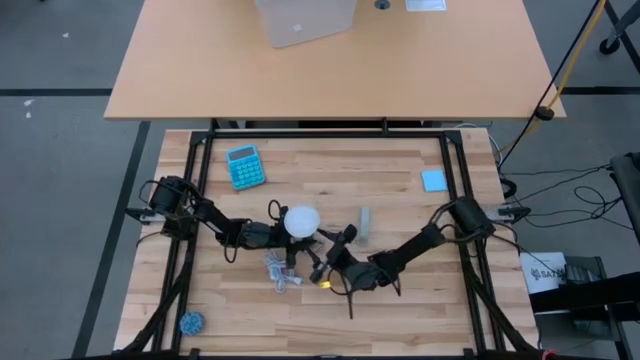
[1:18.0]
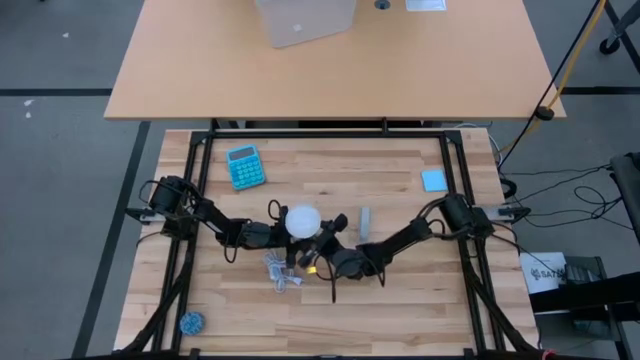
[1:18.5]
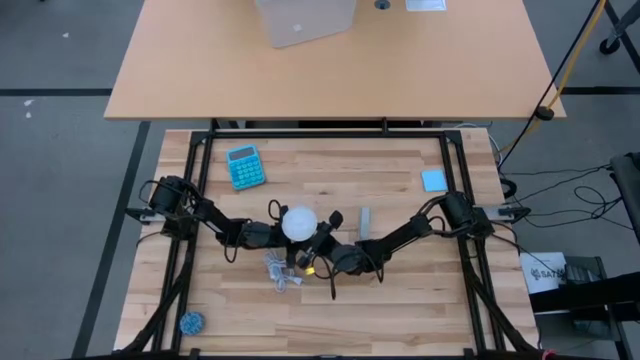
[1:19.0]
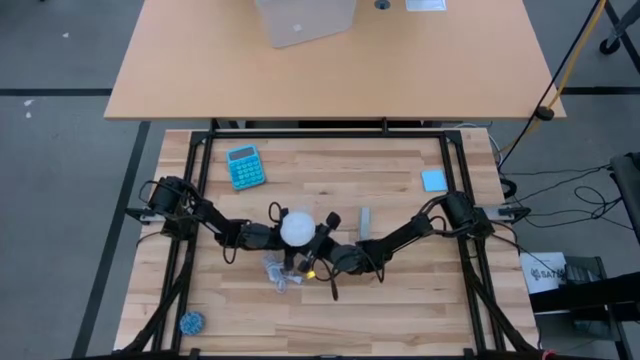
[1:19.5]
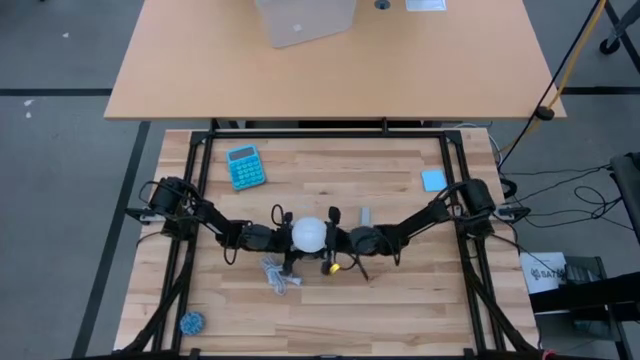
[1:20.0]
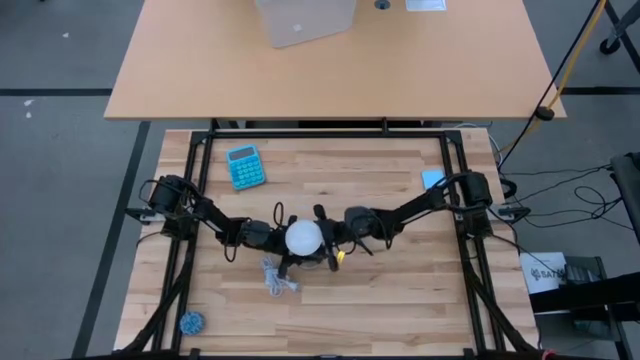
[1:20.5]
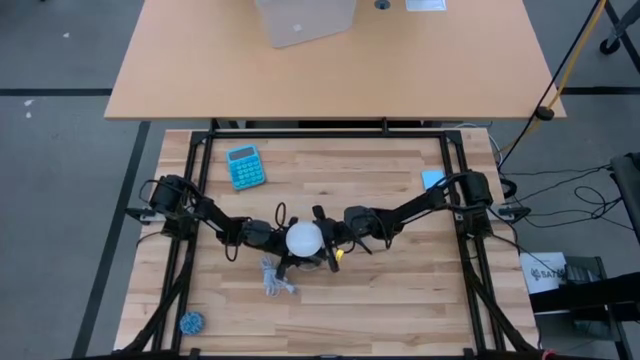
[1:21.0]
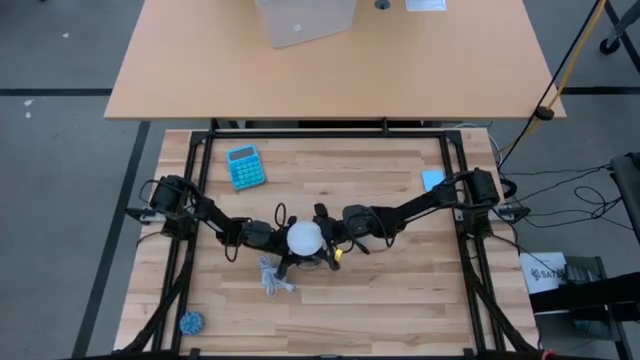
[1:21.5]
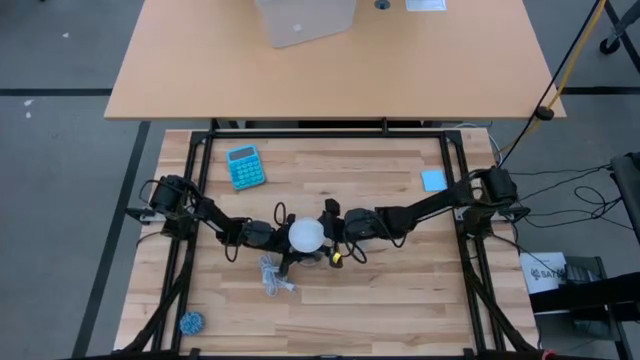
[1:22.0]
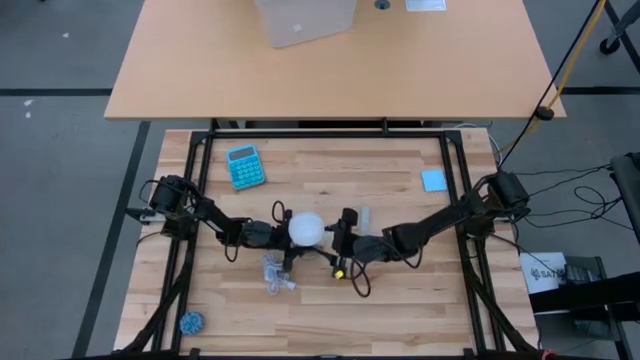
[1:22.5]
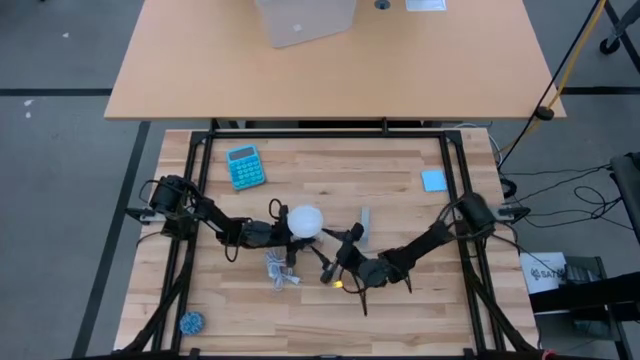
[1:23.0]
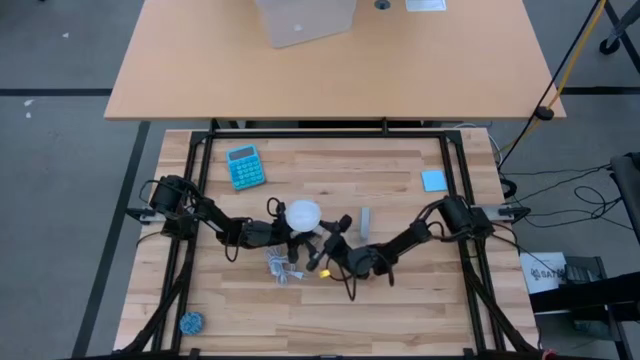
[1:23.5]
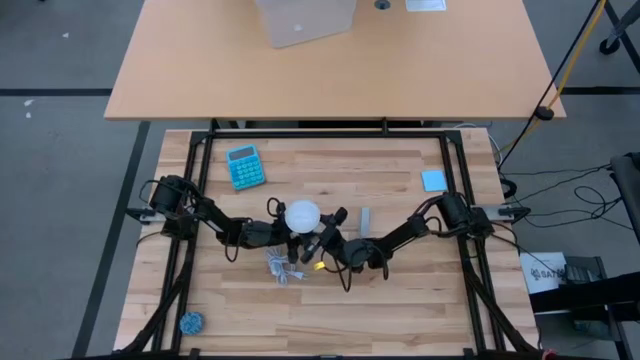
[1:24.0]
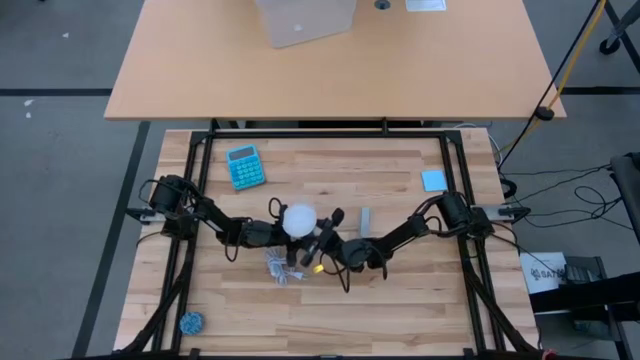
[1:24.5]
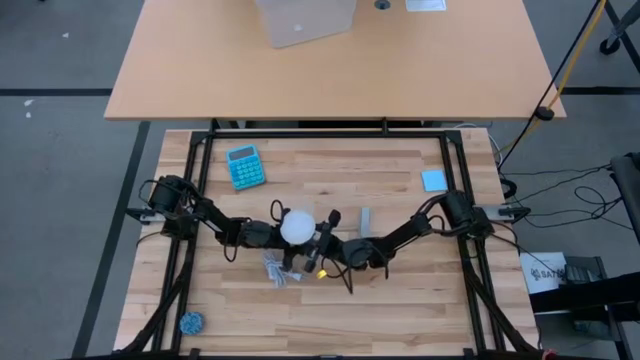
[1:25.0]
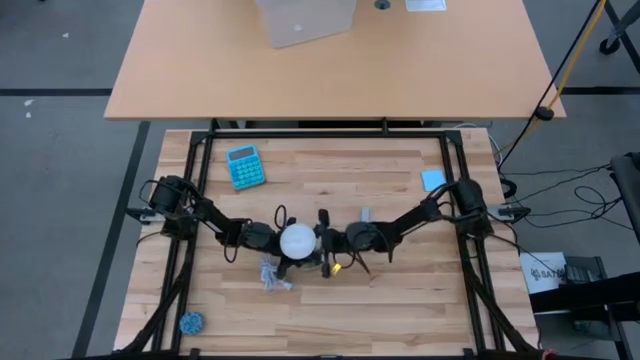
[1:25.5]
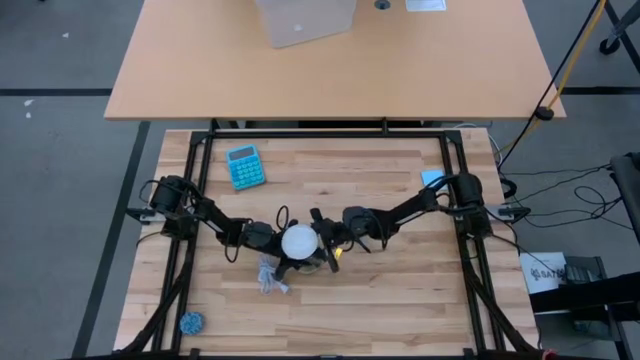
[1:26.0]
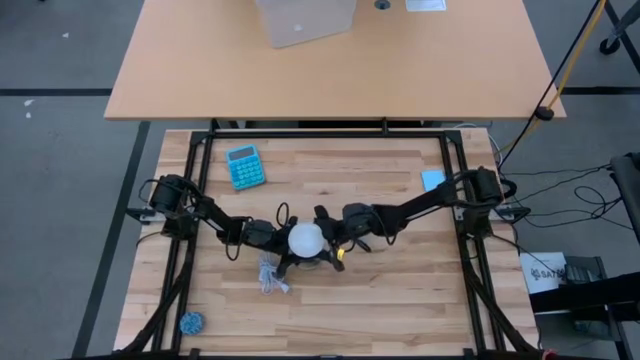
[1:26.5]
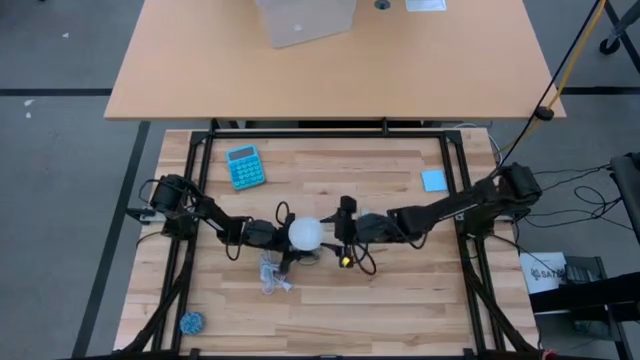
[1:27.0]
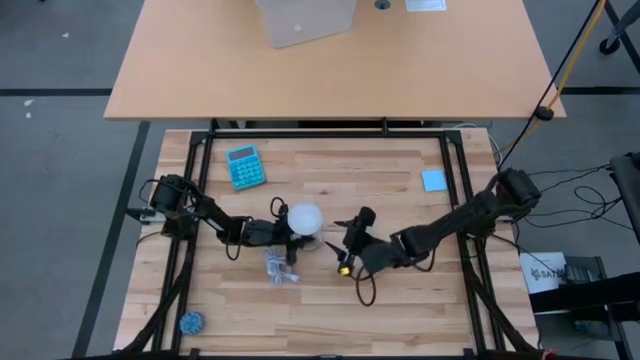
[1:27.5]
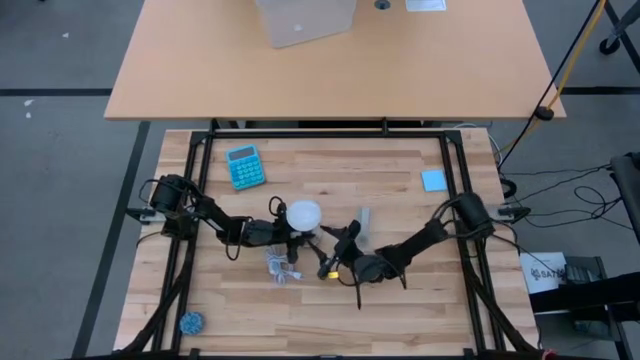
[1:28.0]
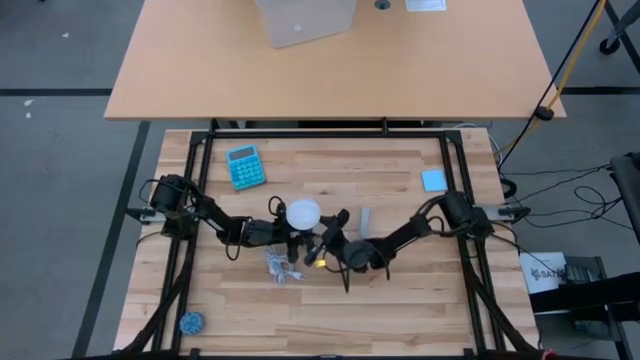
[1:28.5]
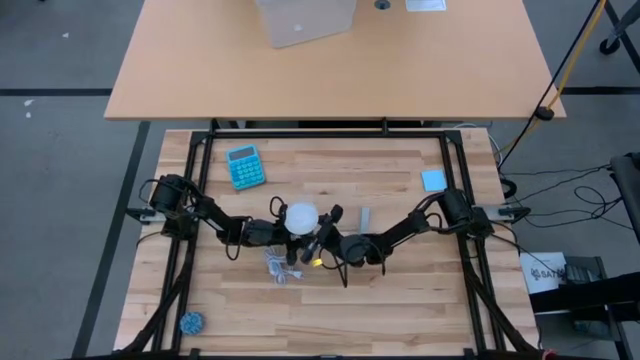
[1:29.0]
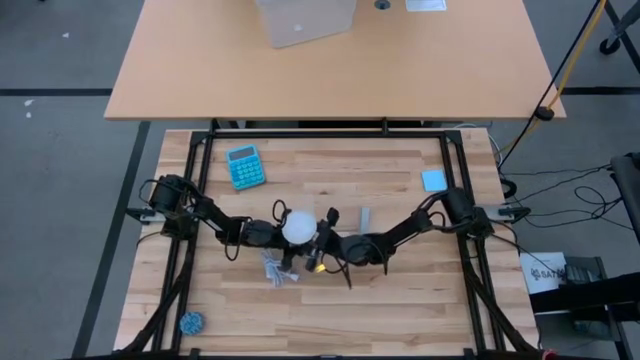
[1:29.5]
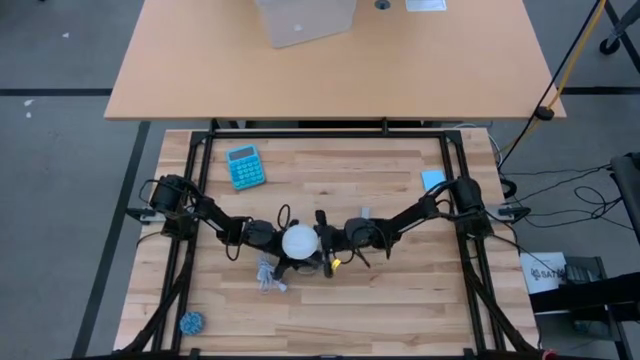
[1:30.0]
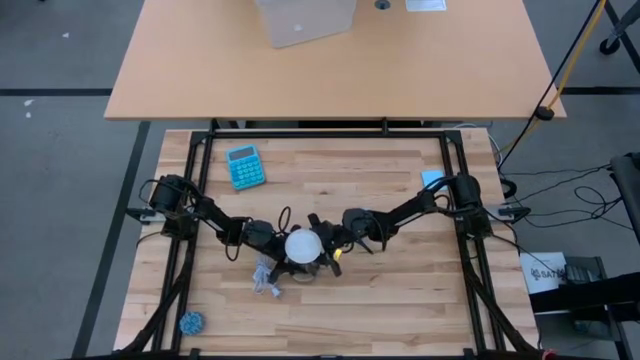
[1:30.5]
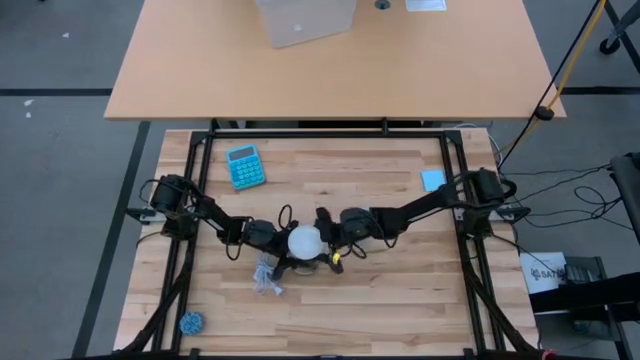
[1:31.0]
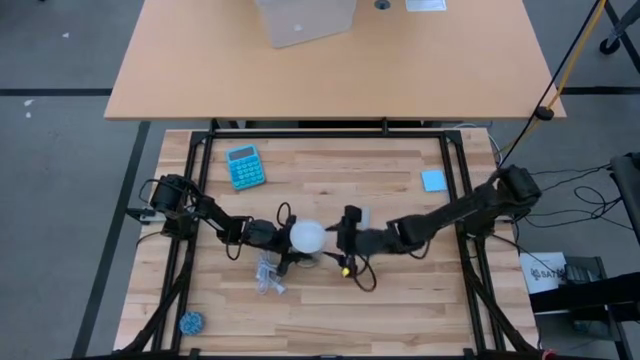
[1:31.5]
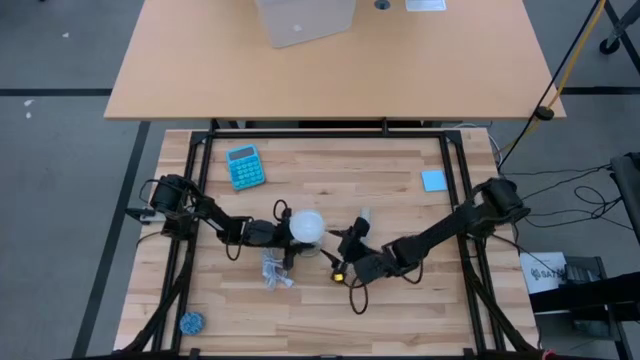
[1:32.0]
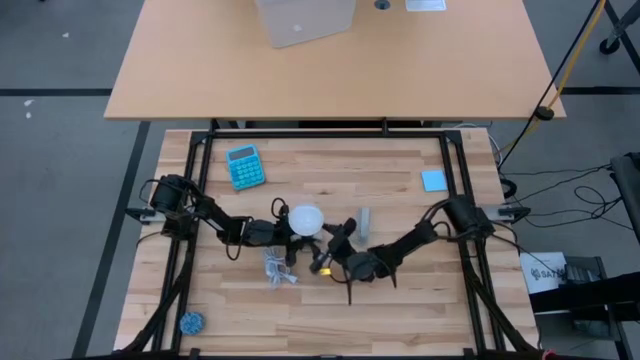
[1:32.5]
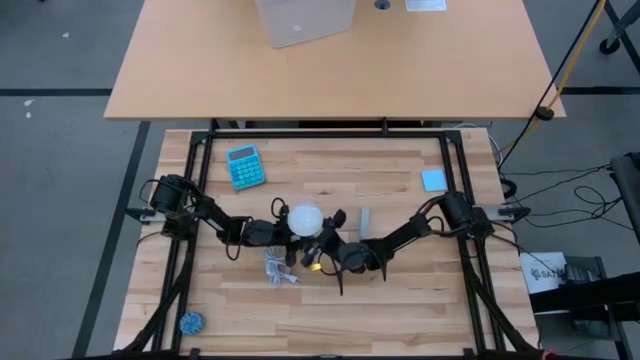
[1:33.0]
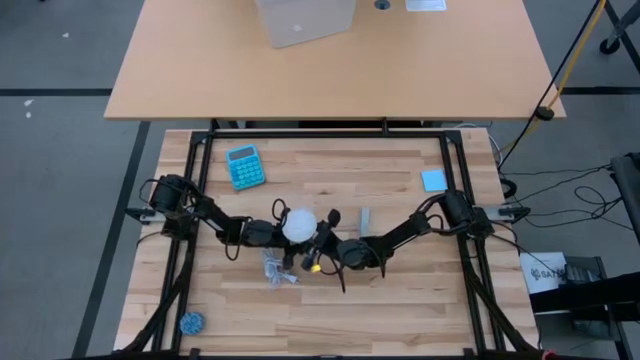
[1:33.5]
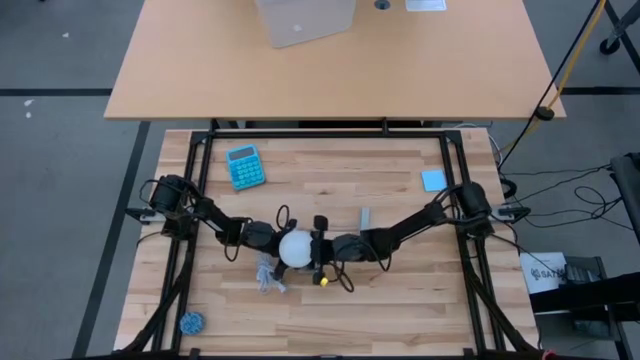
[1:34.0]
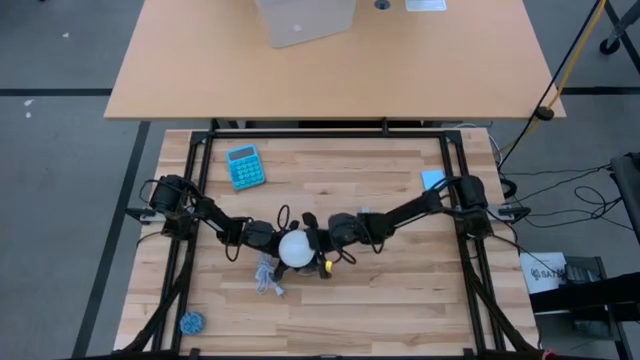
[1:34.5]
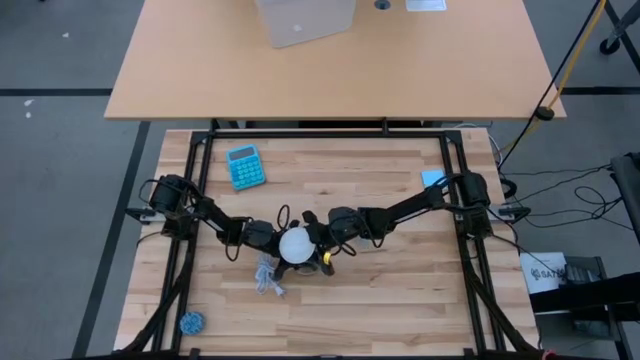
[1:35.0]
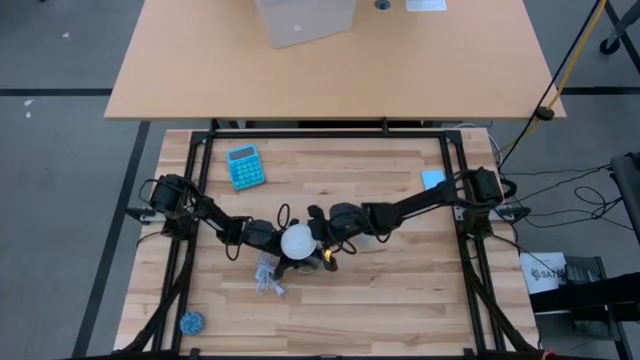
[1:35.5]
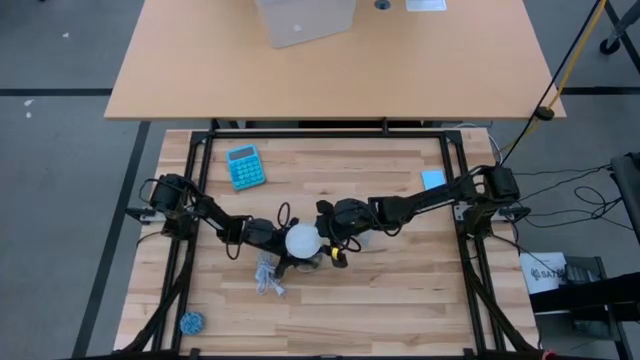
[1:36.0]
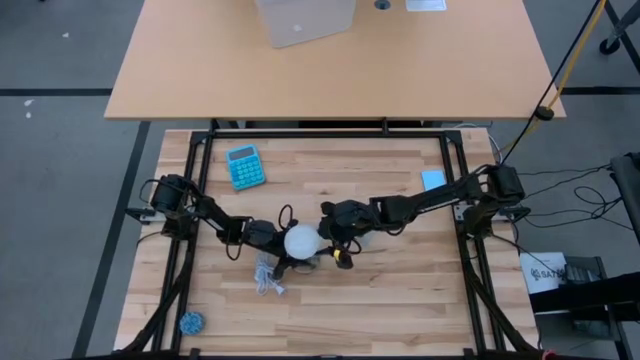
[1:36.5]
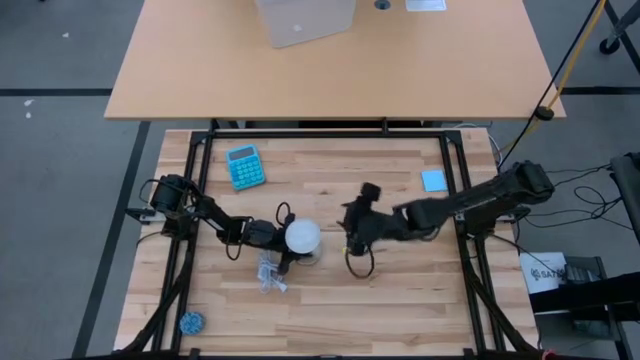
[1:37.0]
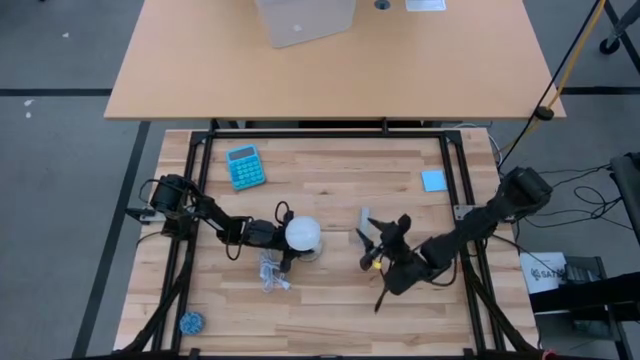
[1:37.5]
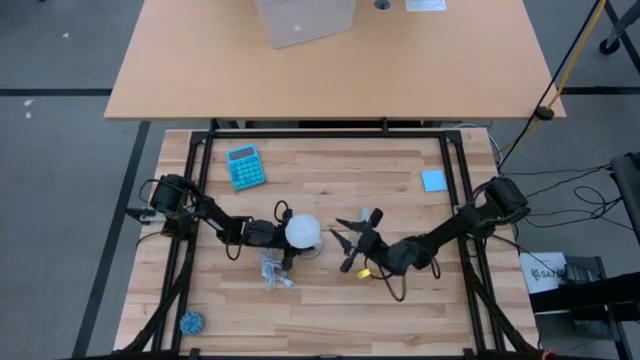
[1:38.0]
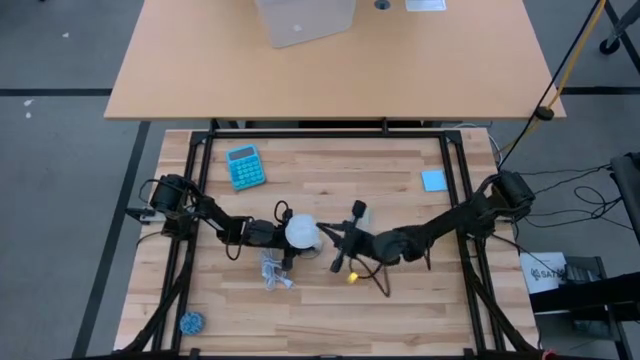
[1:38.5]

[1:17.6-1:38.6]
Task: Screw lightbulb
Remove the light bulb from the lamp
